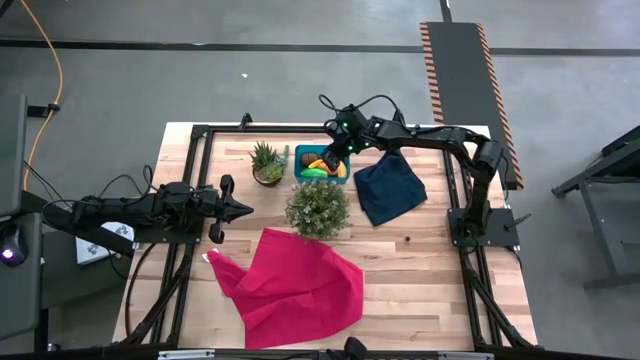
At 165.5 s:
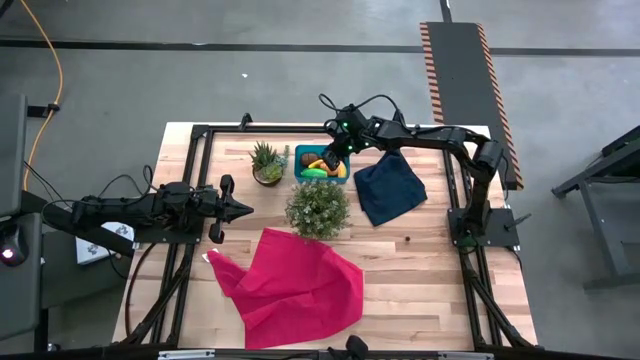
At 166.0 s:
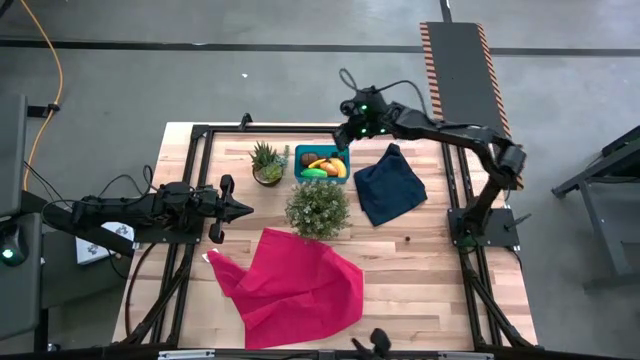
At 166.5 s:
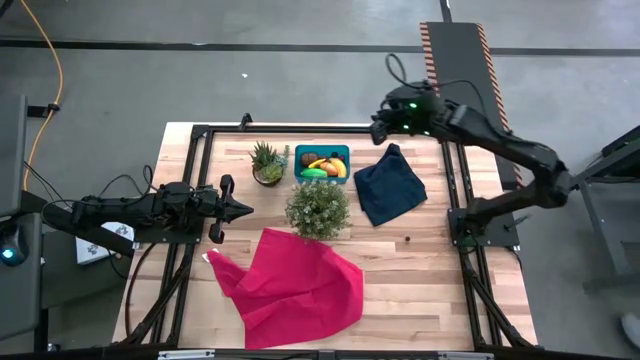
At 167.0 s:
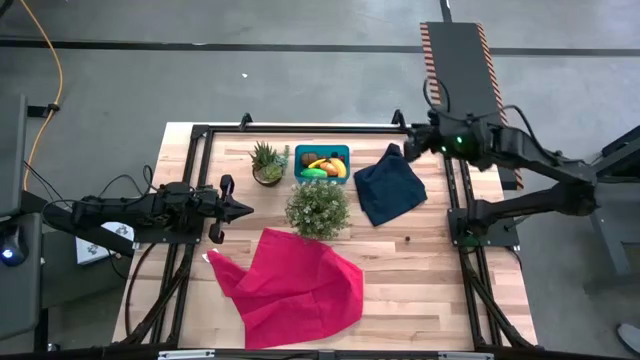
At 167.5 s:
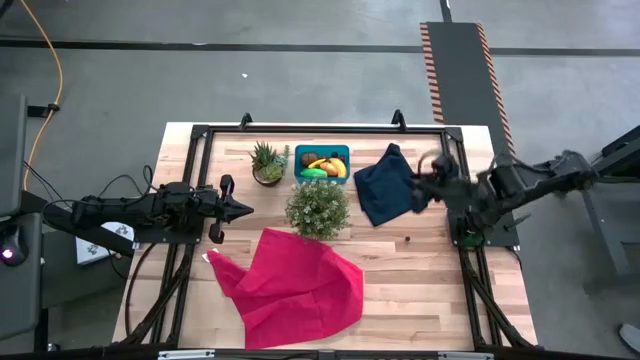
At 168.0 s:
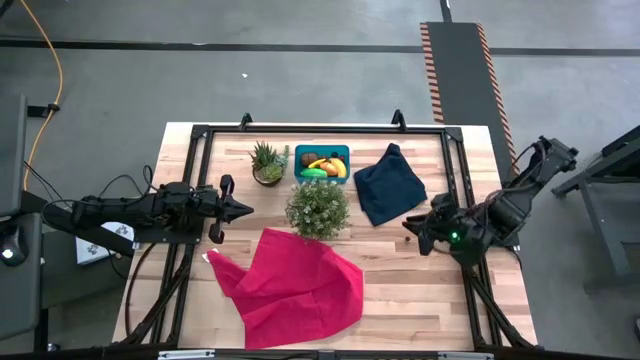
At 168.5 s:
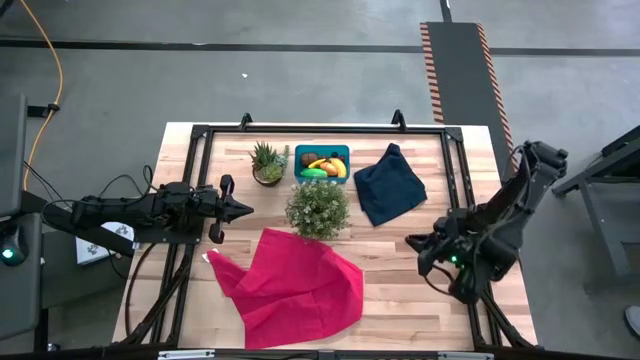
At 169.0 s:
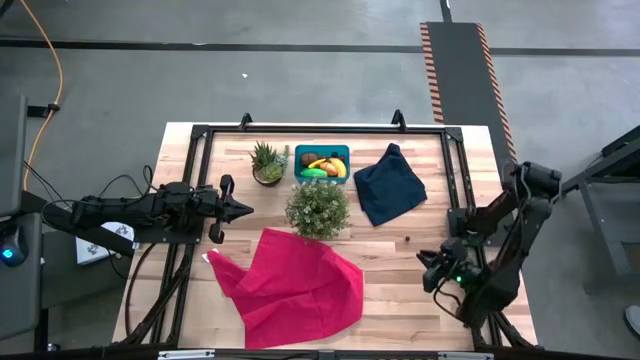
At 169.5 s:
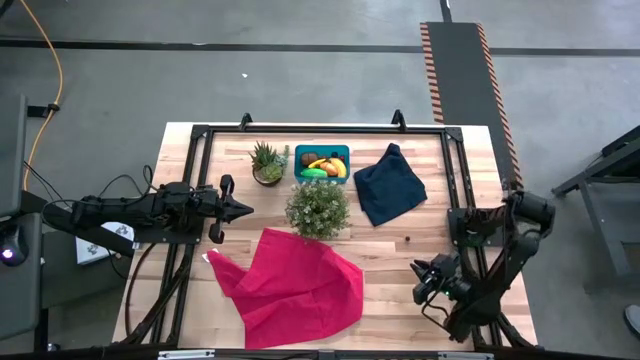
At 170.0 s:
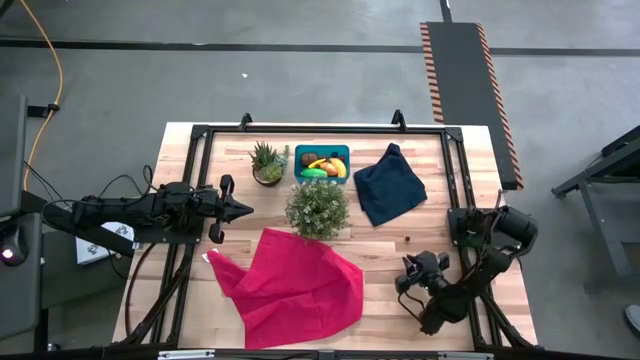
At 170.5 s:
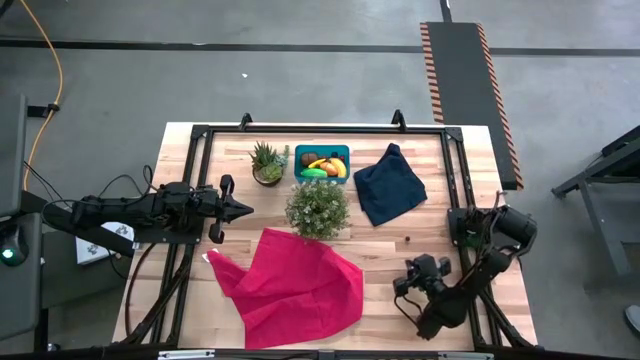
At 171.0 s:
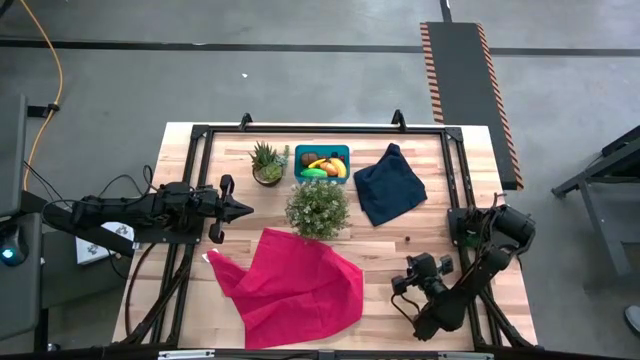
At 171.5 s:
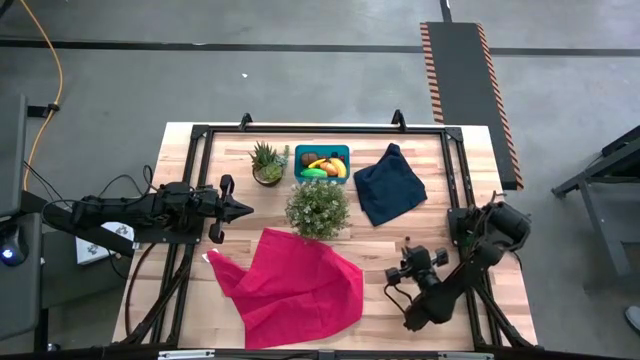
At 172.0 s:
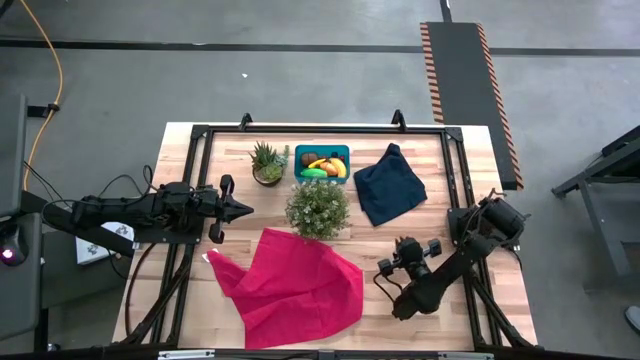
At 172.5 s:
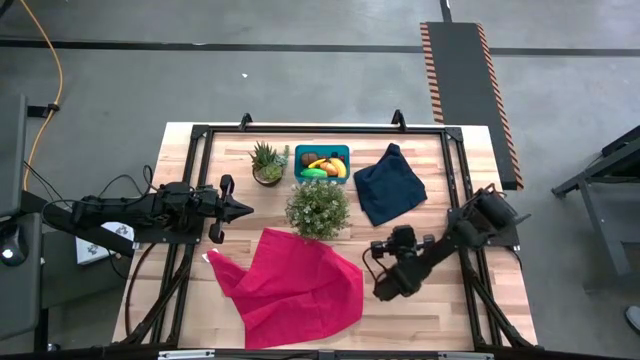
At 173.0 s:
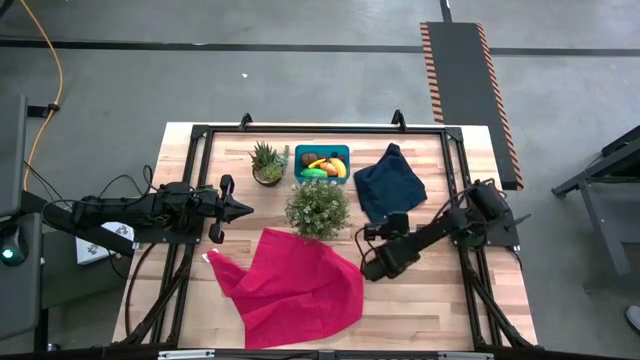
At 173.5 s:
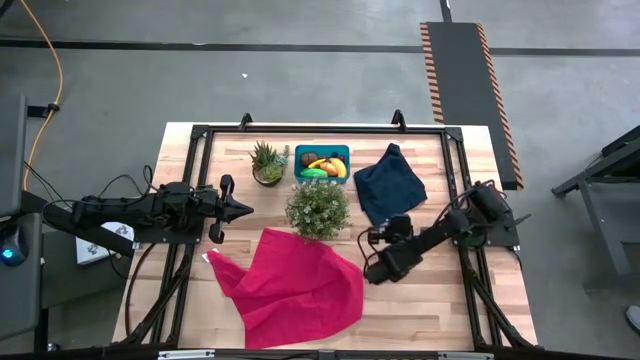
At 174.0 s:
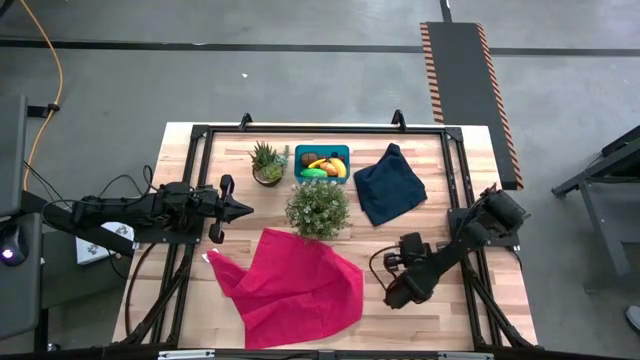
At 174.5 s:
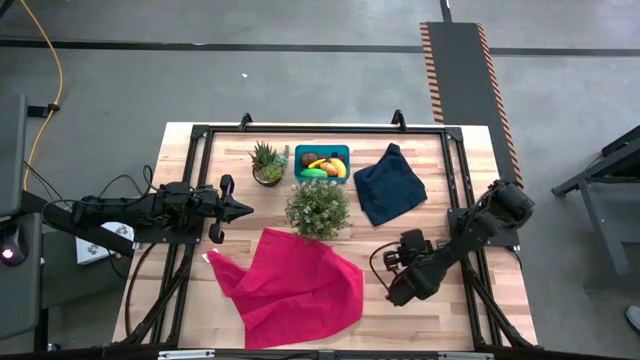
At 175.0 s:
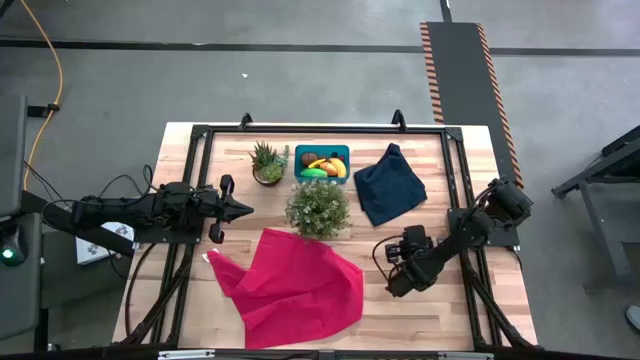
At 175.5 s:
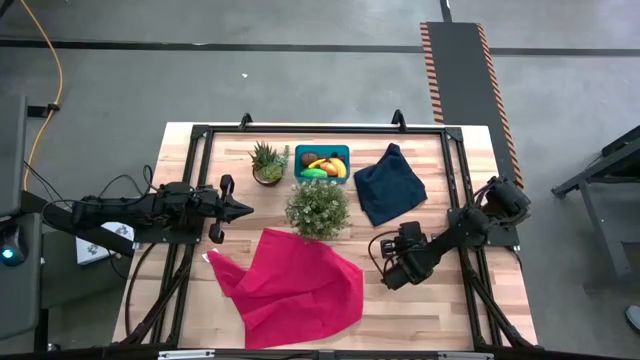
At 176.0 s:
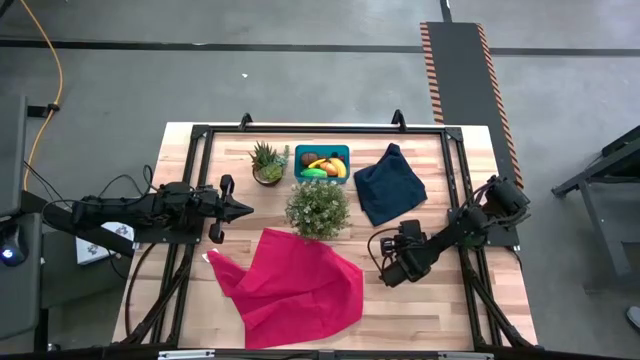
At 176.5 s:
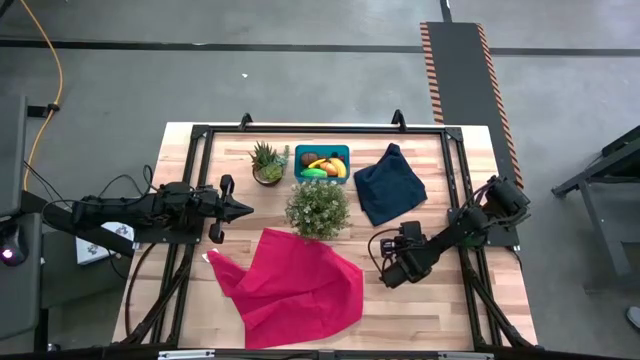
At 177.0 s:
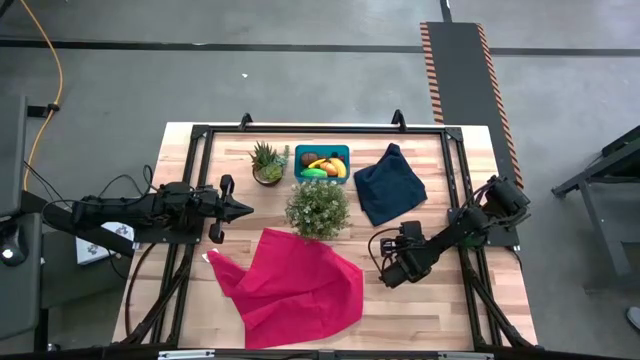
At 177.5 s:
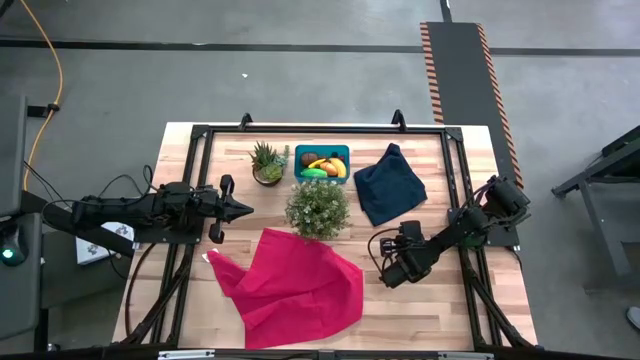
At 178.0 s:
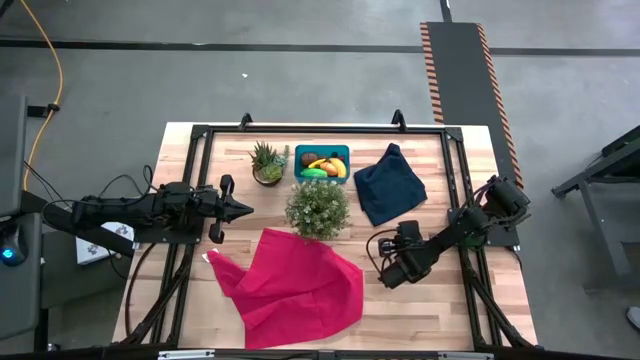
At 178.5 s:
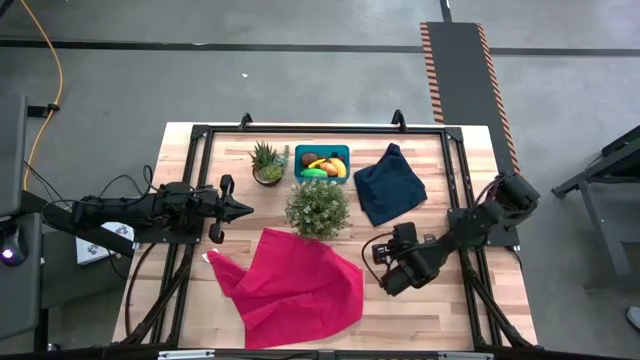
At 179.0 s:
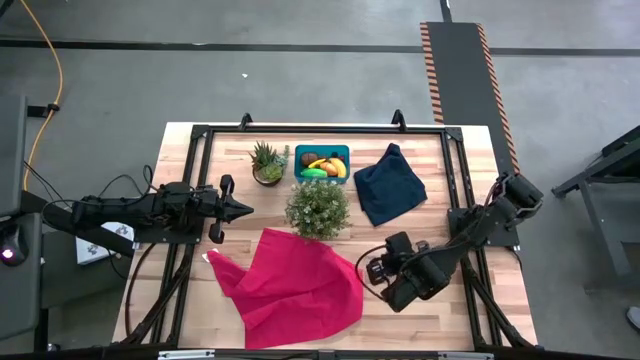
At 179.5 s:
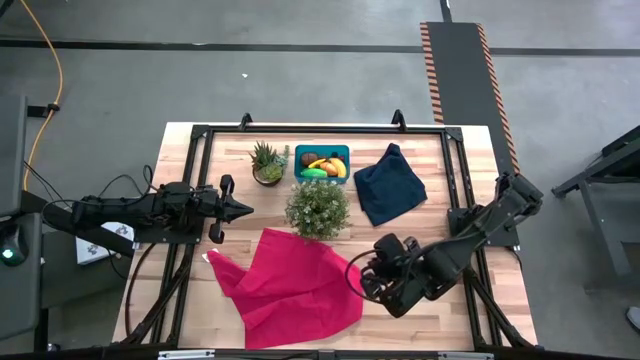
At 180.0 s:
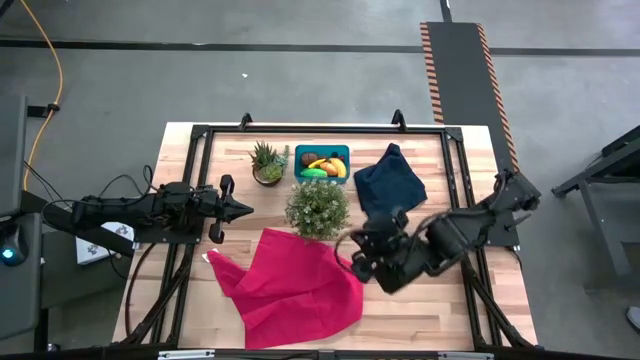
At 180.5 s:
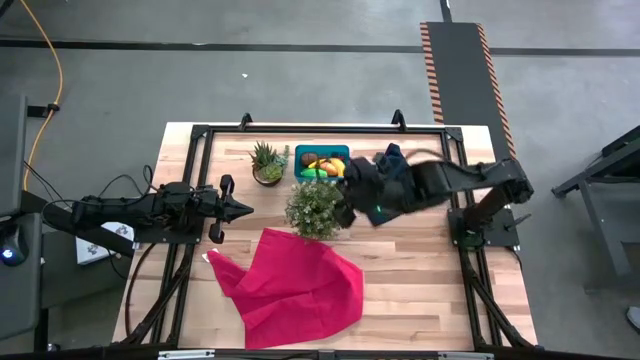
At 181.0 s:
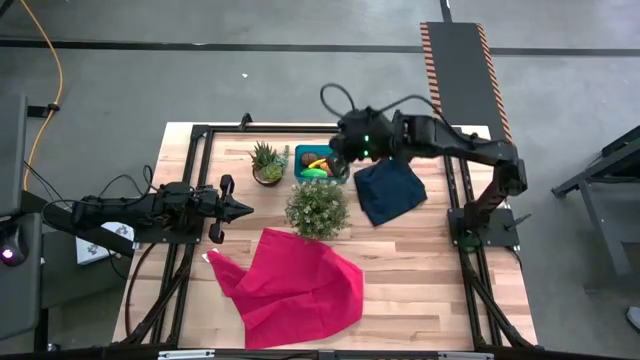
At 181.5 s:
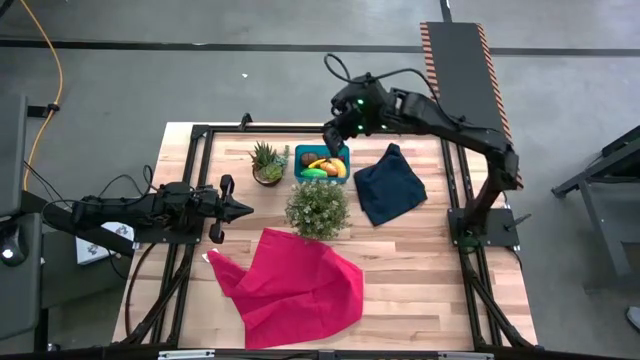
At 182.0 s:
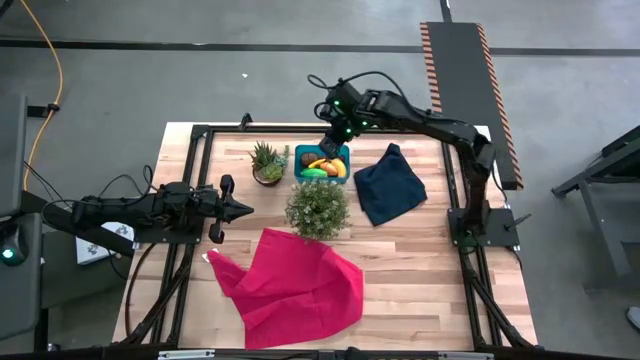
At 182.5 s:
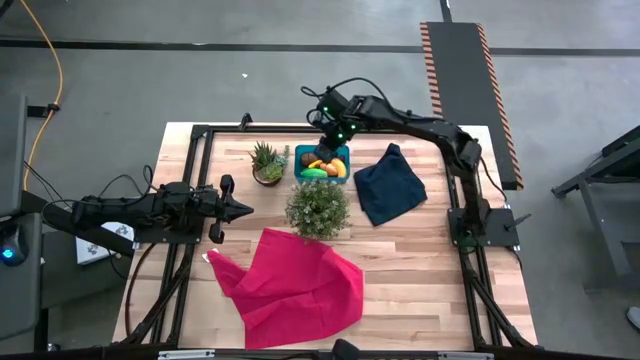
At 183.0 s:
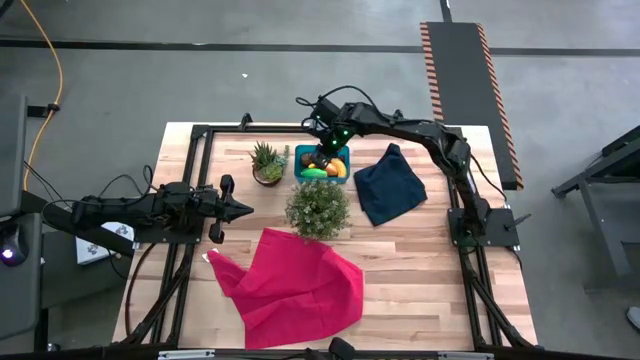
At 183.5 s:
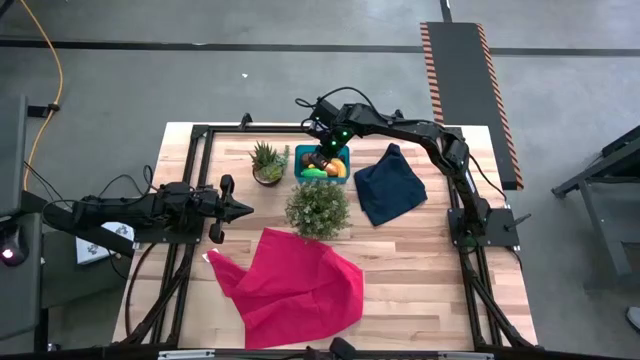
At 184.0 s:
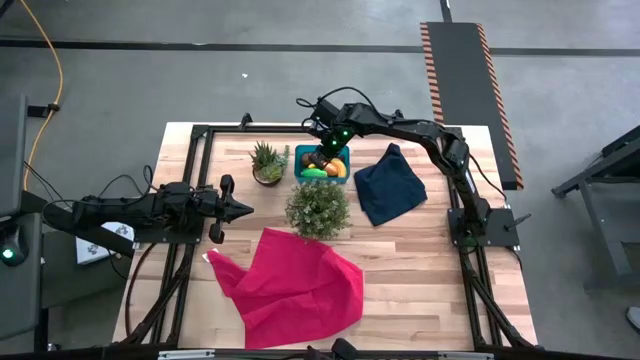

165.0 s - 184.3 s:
Task: Pick and placing Produce into tupperware
Put the blueberry into the blue bin
